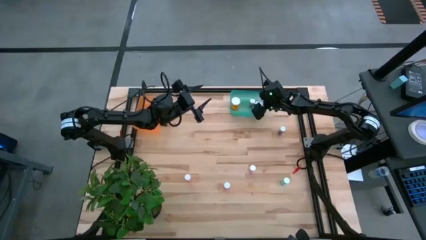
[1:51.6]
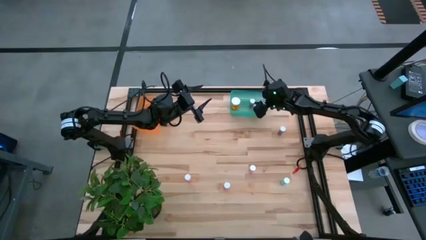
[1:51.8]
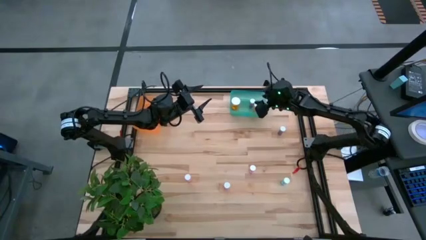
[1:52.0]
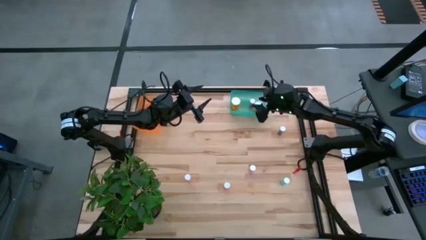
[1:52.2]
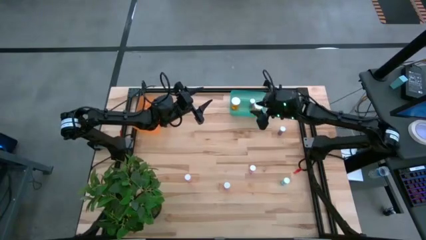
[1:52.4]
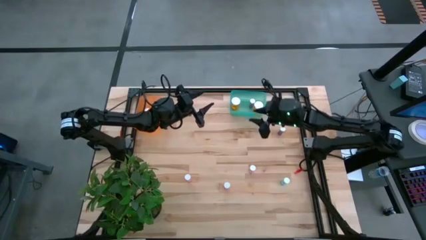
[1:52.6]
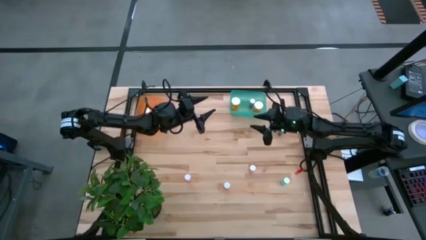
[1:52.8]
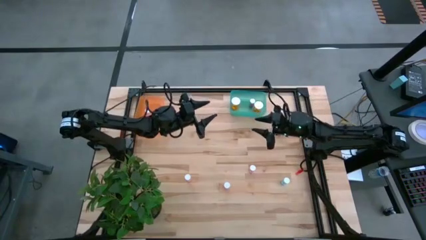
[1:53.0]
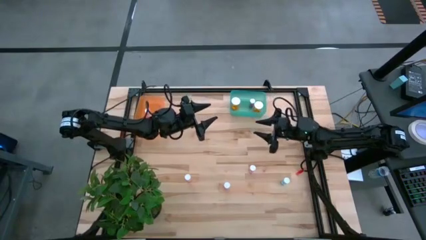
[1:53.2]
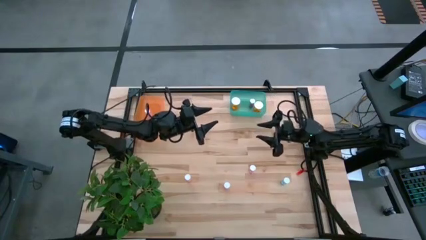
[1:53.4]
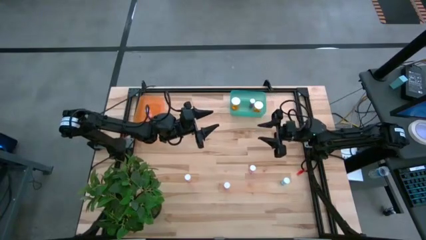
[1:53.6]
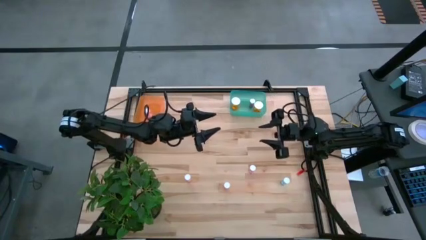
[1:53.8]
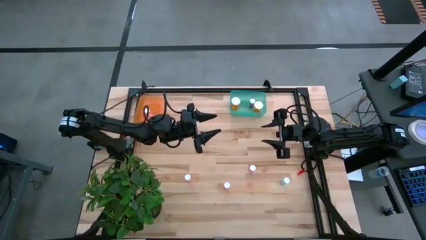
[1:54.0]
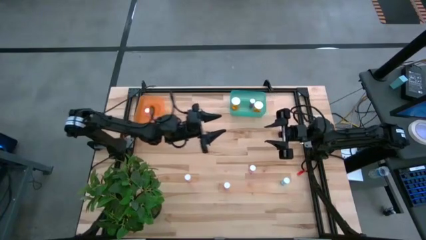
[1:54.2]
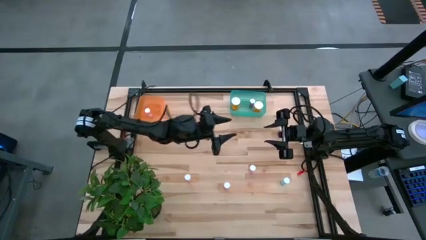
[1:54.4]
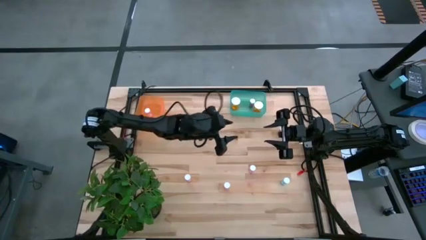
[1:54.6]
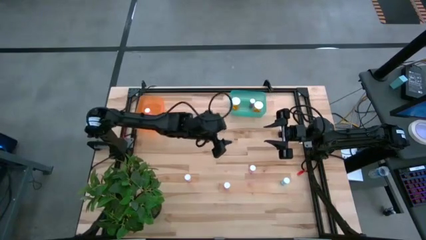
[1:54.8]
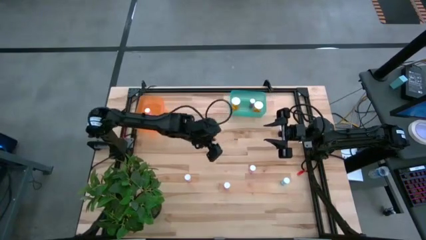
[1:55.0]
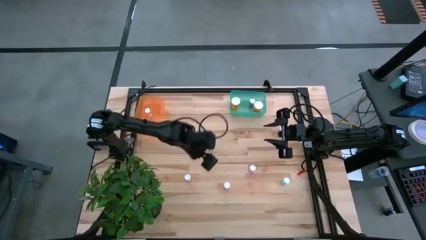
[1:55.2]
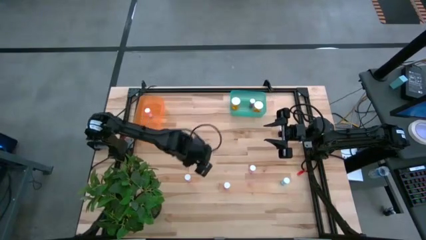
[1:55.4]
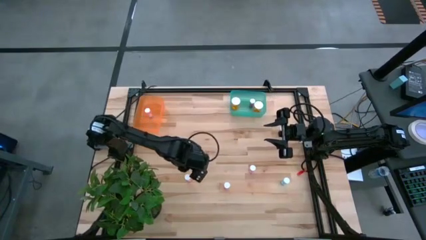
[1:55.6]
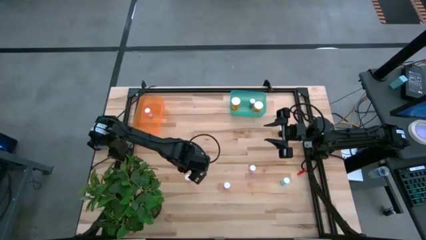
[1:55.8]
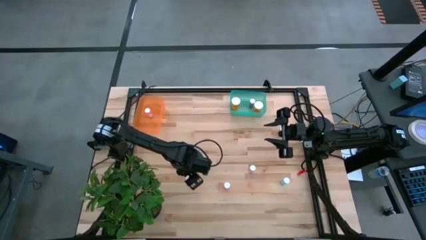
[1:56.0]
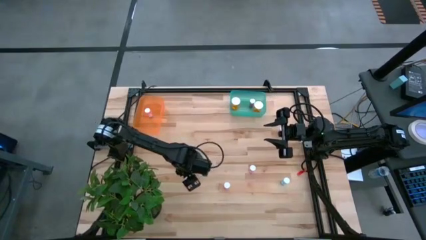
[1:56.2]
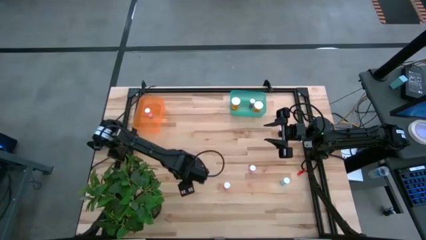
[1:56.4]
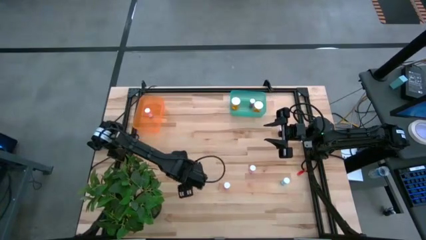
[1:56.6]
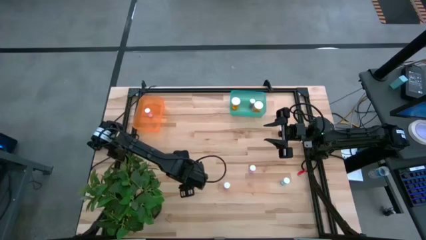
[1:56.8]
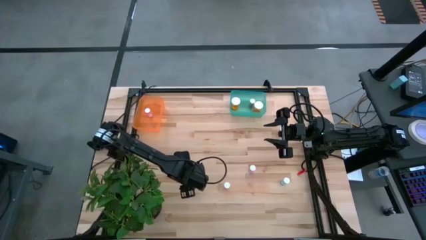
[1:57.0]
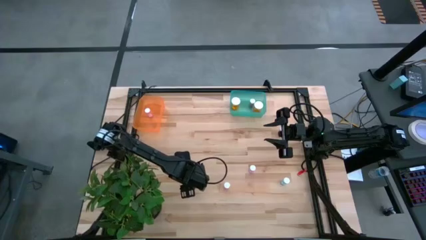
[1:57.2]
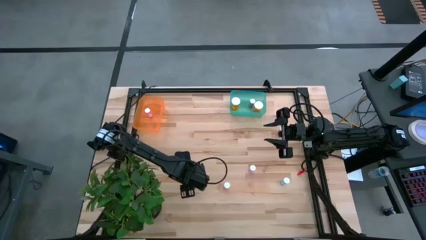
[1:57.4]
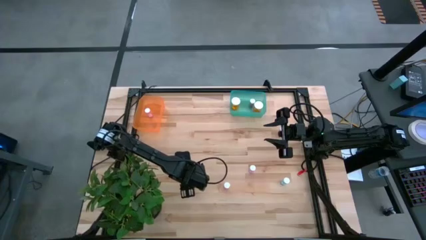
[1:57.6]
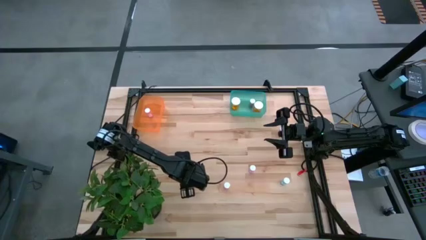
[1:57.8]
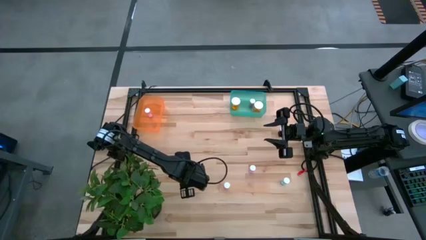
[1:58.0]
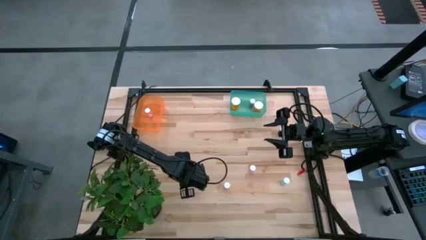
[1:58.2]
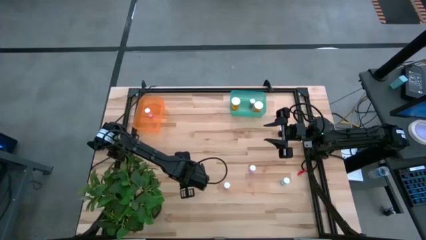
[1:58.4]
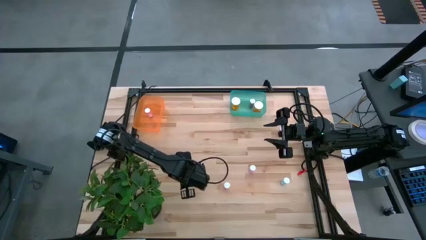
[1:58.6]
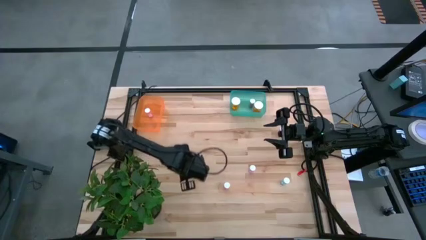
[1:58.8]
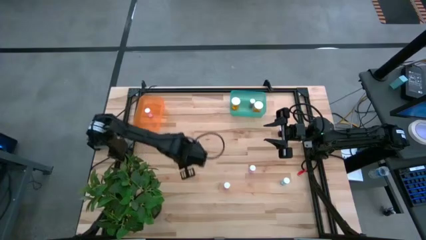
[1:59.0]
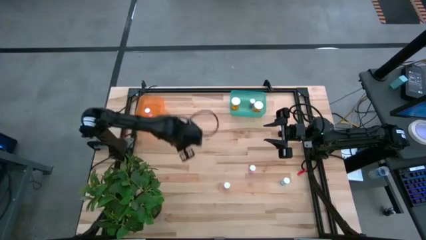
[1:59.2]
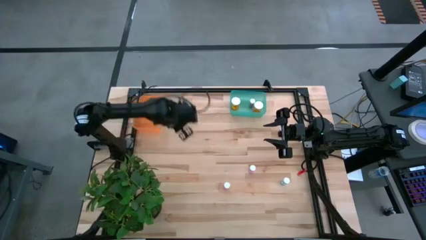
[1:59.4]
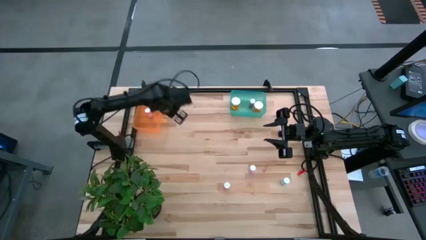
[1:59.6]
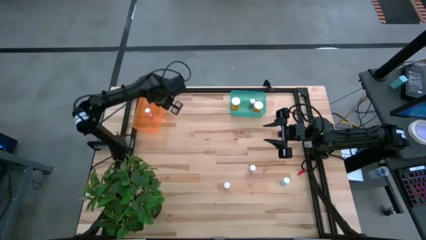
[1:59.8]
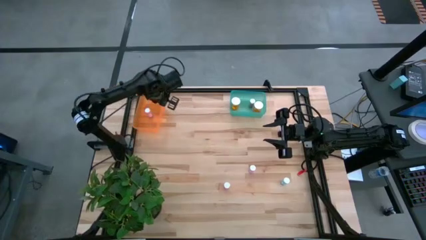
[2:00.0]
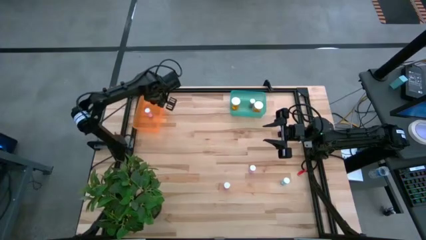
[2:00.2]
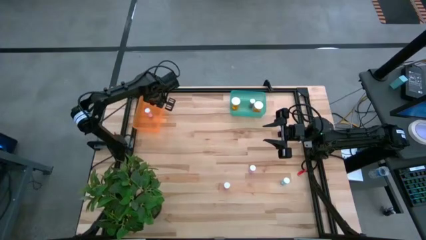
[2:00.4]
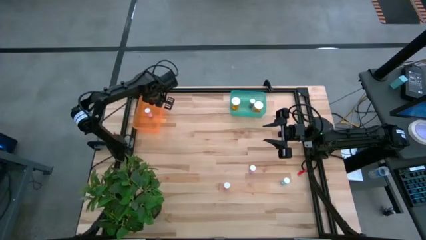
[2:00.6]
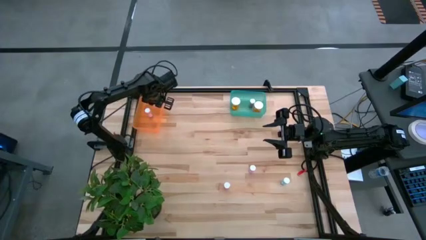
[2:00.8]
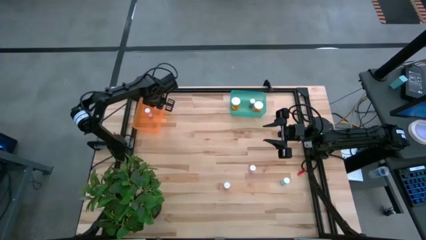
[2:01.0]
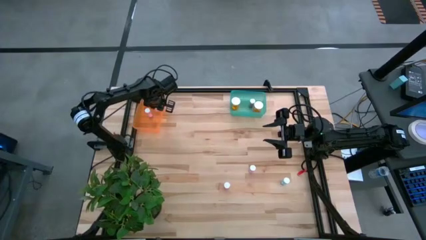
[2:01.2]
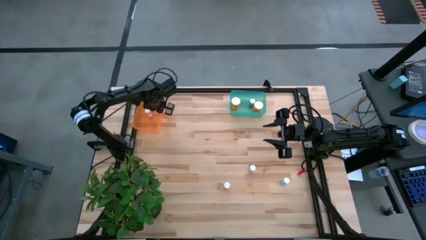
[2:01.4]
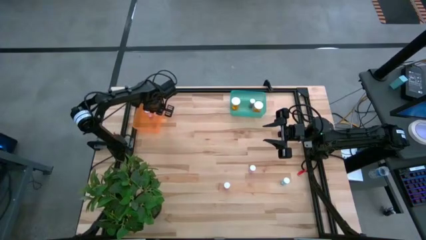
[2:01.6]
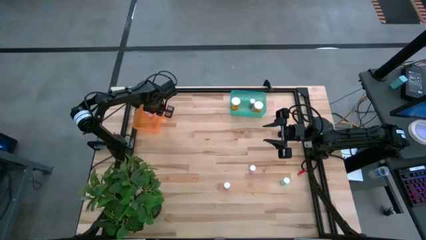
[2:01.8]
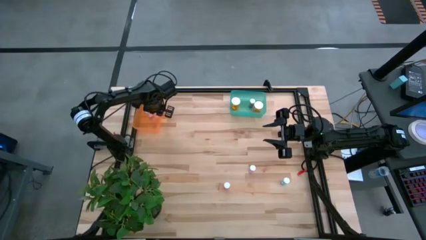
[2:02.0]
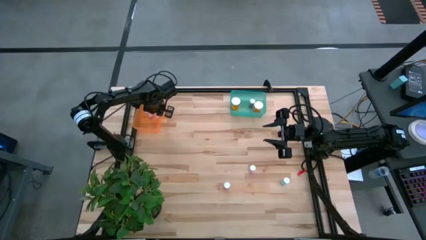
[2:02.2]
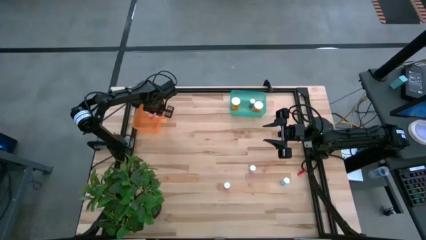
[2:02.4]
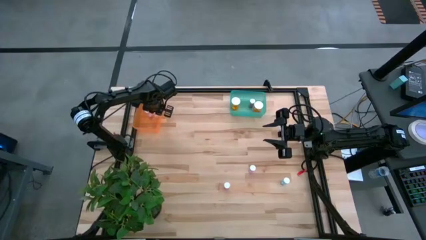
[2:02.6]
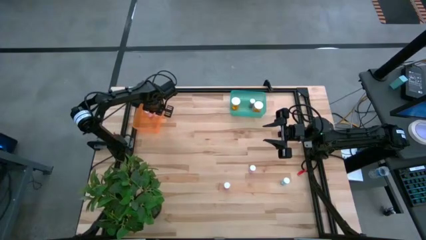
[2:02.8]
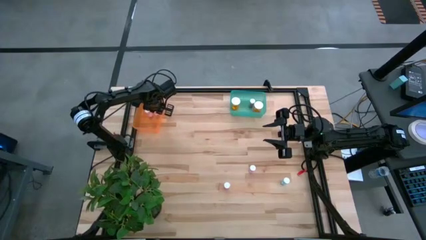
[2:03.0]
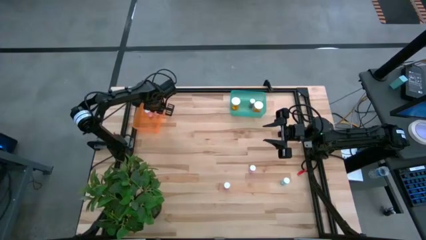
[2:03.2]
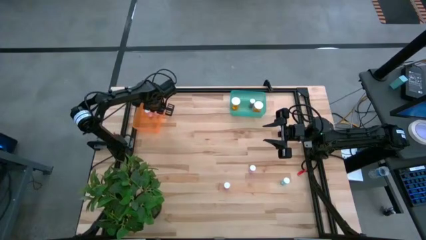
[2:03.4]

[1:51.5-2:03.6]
Task: Pick and place medicine bottles into bin by pill shape (circle, oval)
Put the pink tablet bottle into the orange bin

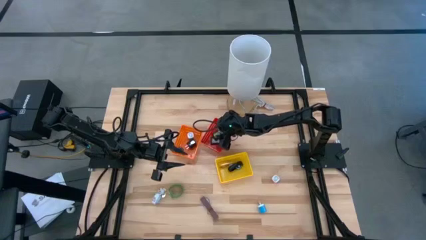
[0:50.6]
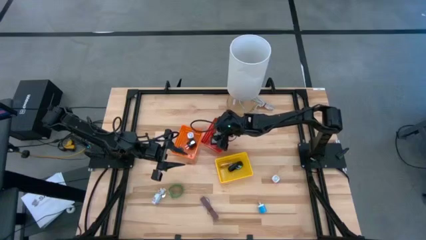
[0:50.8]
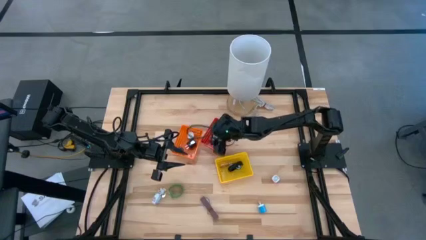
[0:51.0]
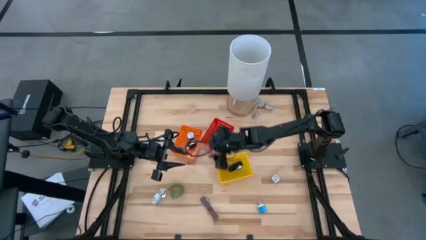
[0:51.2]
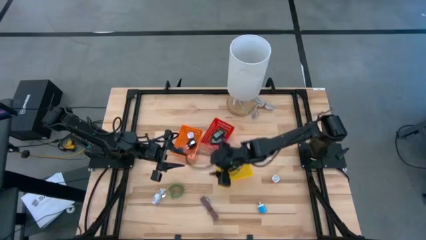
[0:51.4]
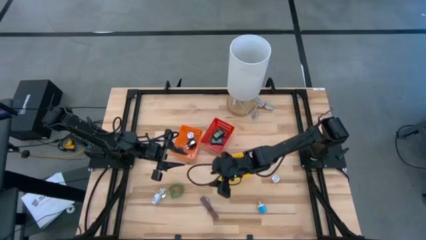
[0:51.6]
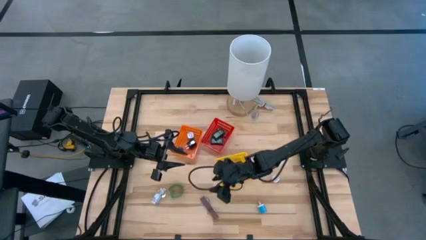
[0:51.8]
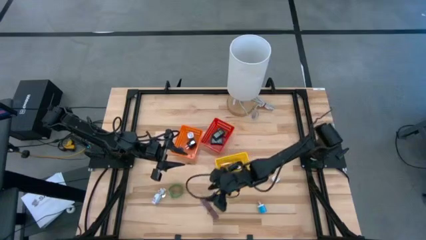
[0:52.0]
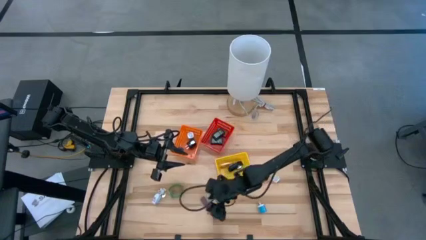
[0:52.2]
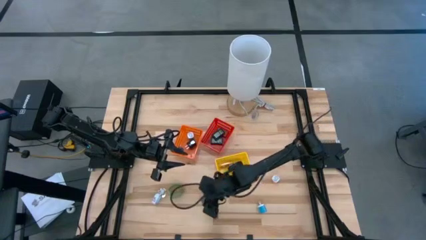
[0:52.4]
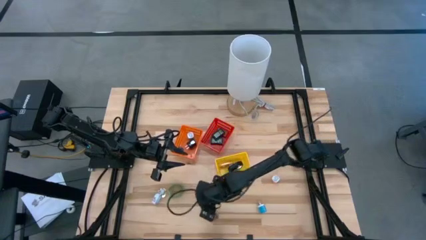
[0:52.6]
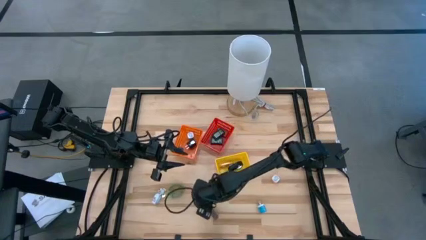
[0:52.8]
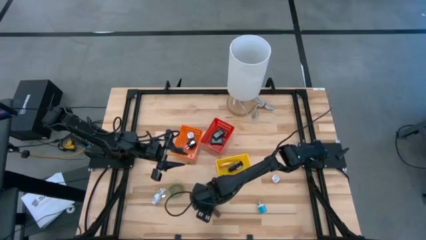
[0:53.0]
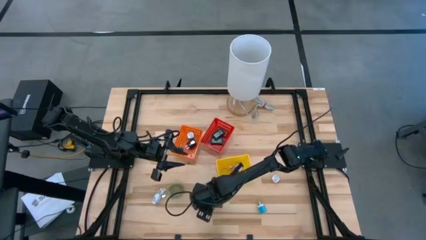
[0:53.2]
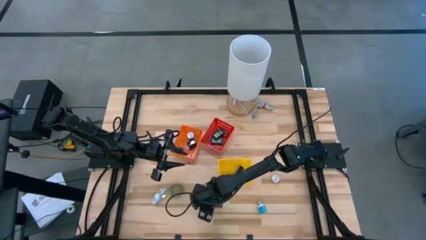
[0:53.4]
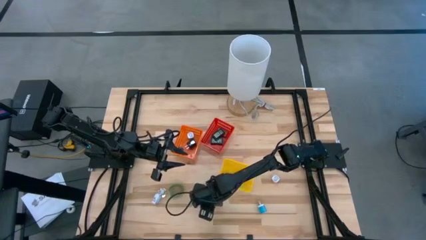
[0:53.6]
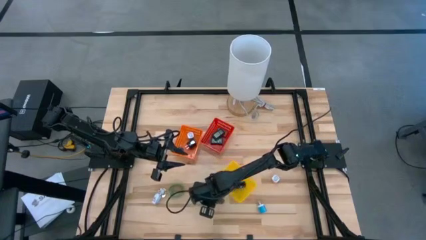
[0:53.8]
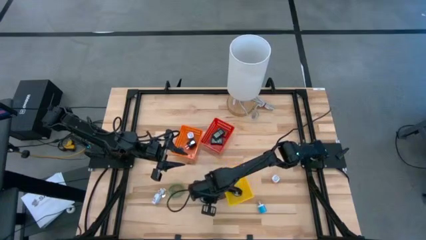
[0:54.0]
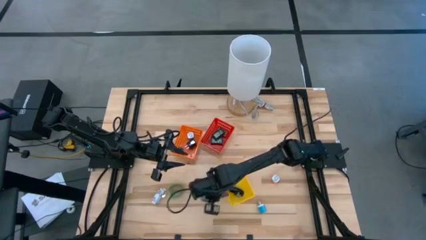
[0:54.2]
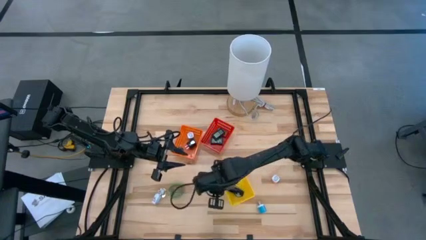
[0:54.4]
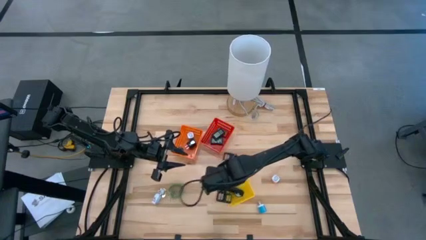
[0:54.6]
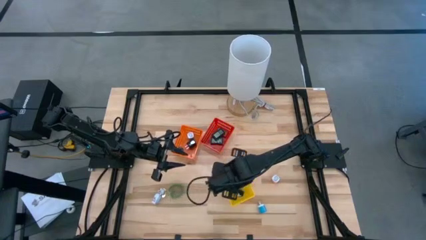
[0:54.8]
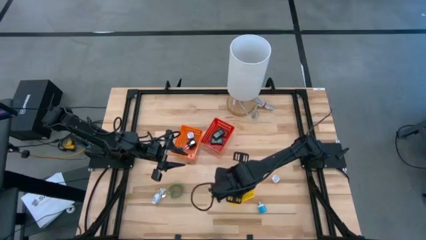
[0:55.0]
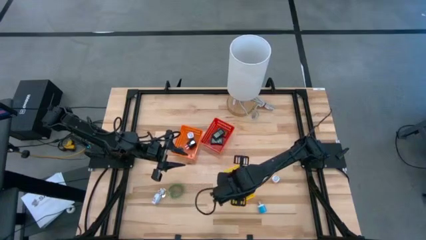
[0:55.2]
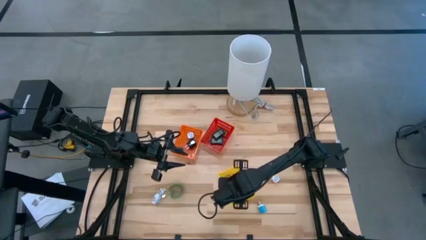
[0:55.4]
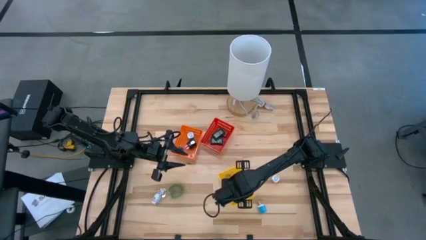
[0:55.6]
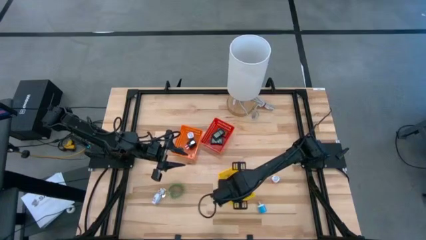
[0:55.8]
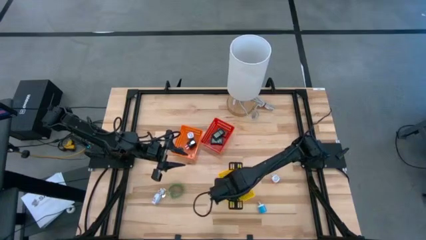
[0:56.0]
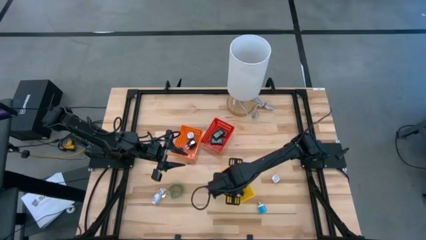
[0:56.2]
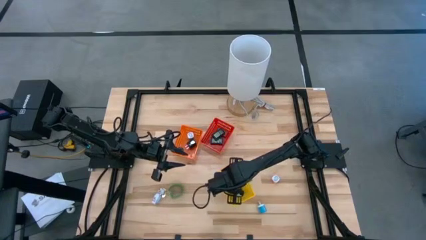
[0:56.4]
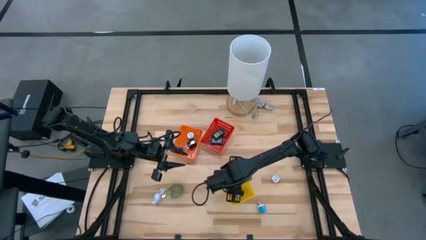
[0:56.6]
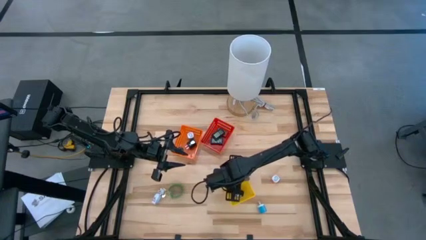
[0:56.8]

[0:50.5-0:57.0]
Task: Pick & Place Office items
Put the brown wrist watch into the yellow bin
